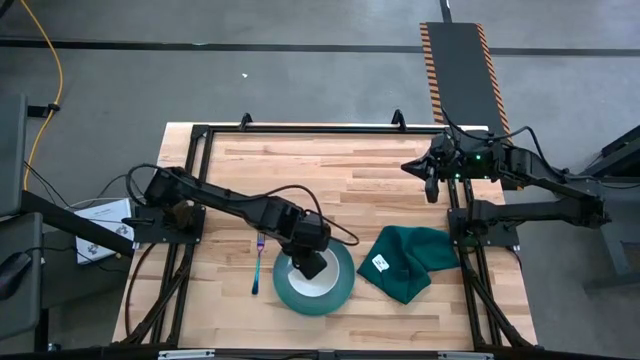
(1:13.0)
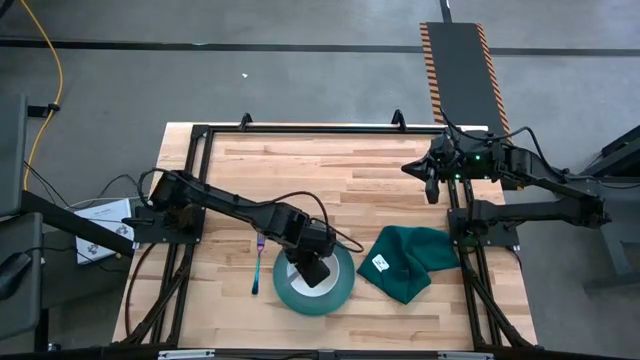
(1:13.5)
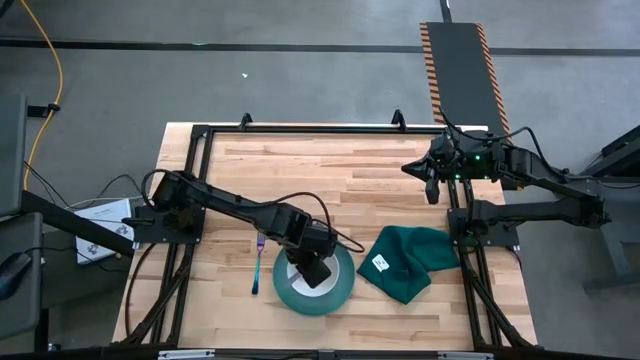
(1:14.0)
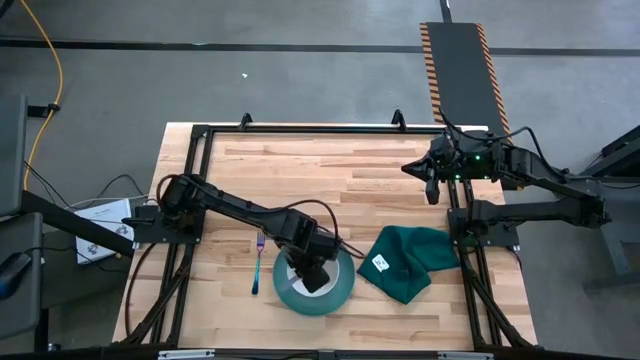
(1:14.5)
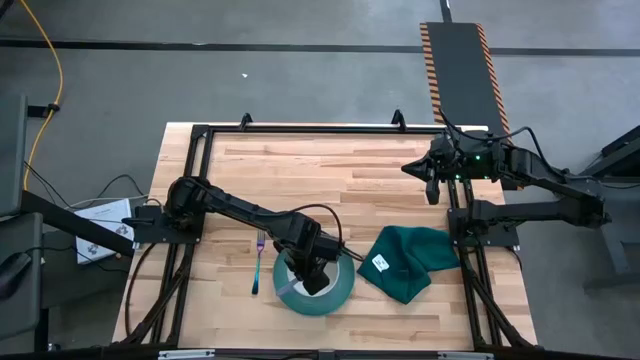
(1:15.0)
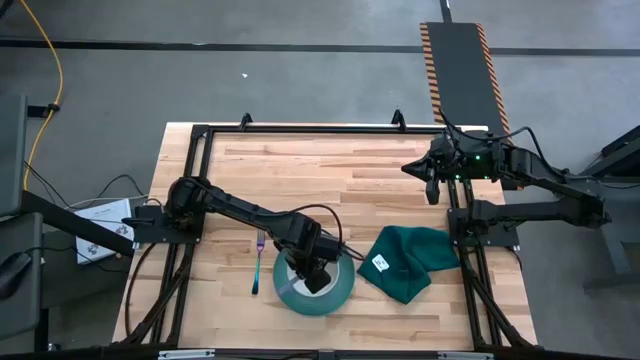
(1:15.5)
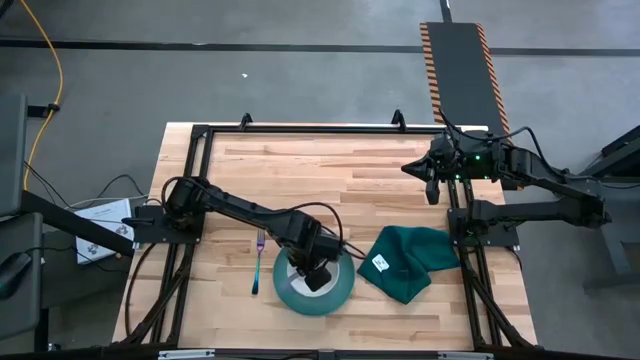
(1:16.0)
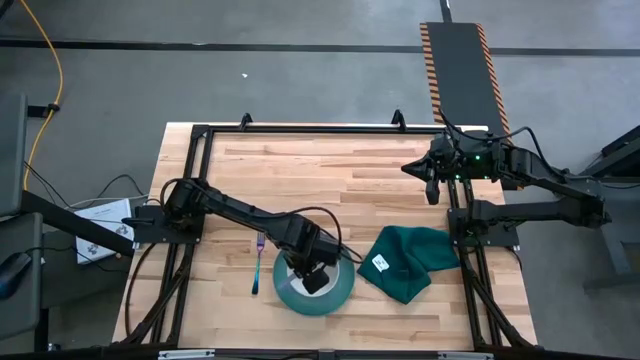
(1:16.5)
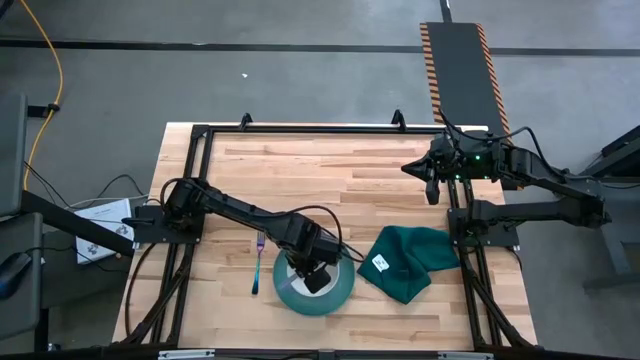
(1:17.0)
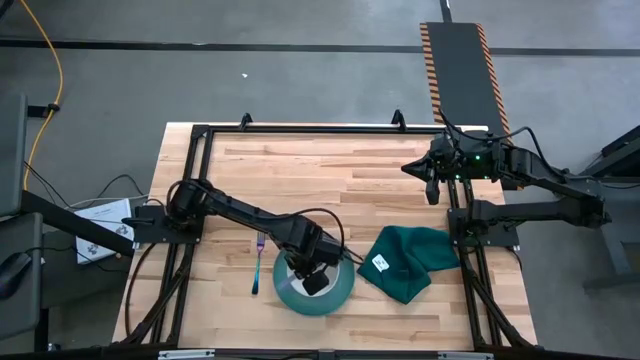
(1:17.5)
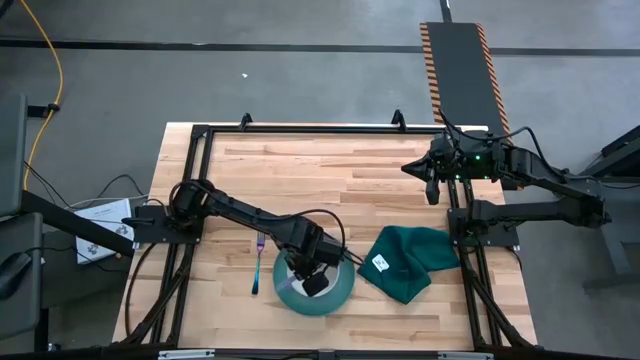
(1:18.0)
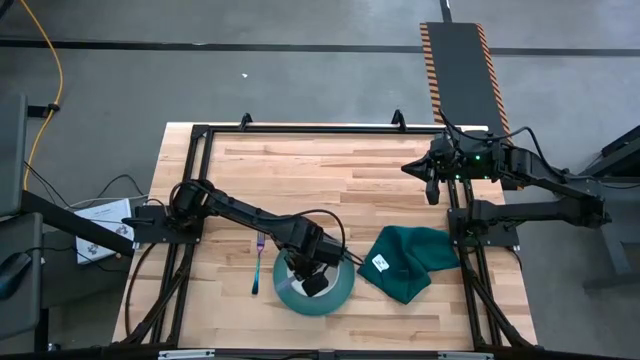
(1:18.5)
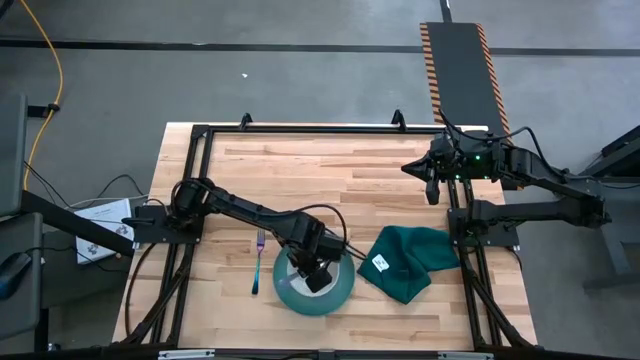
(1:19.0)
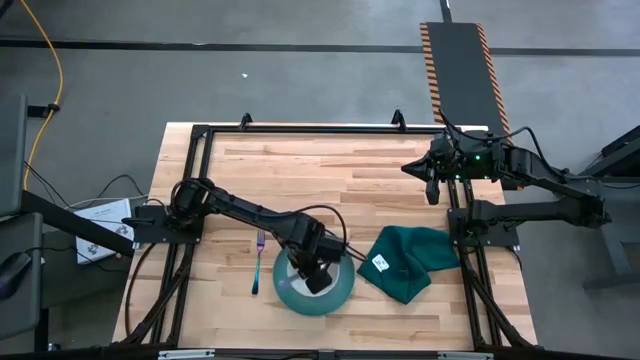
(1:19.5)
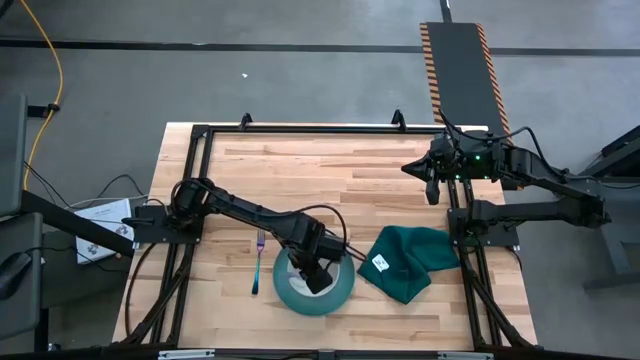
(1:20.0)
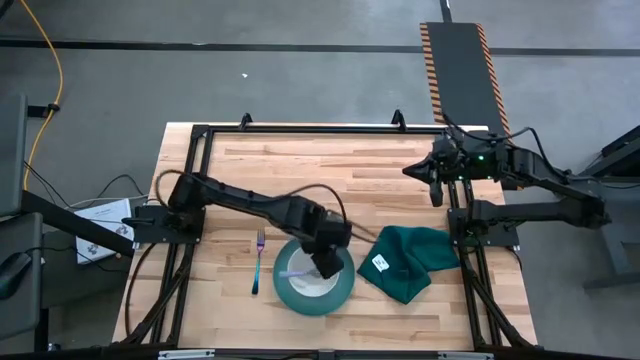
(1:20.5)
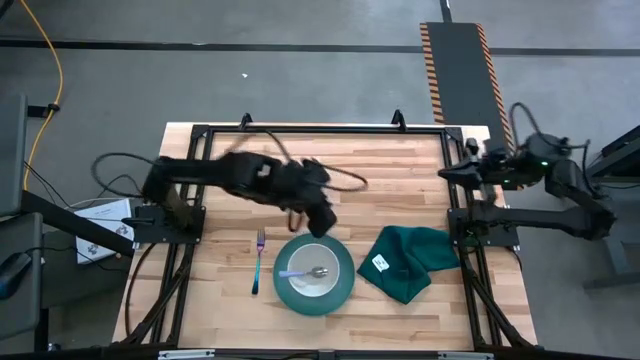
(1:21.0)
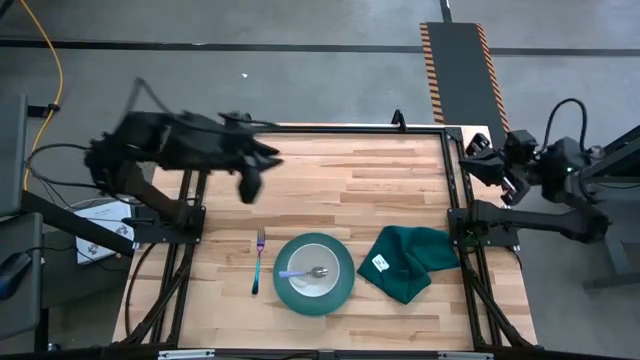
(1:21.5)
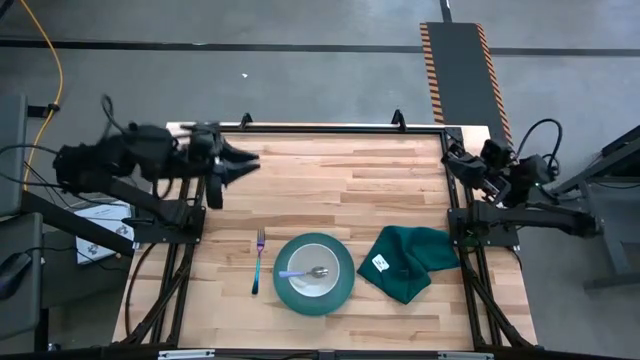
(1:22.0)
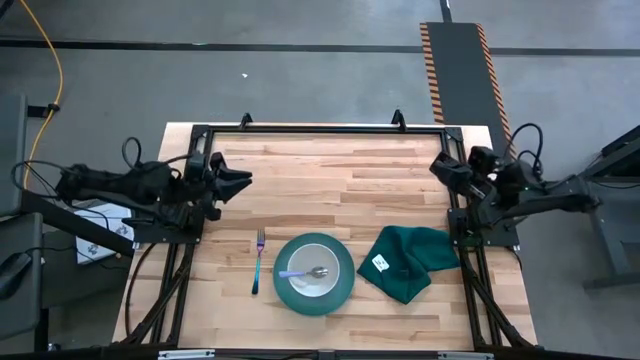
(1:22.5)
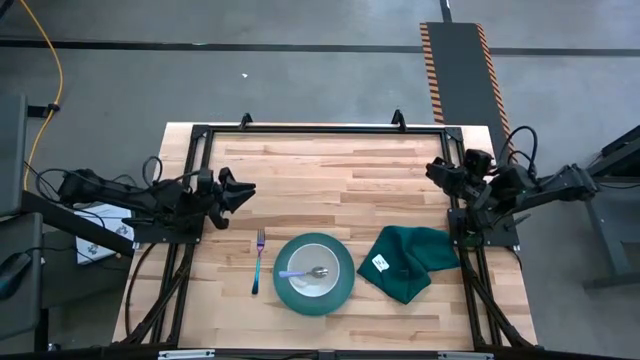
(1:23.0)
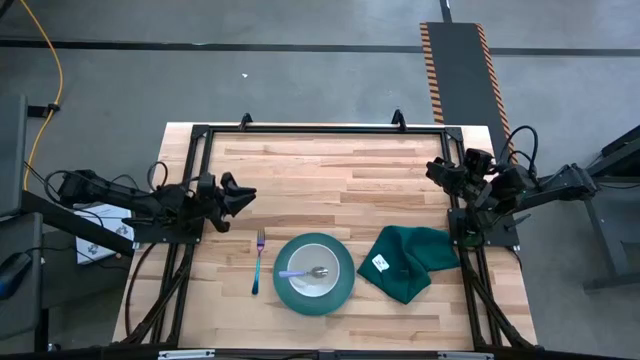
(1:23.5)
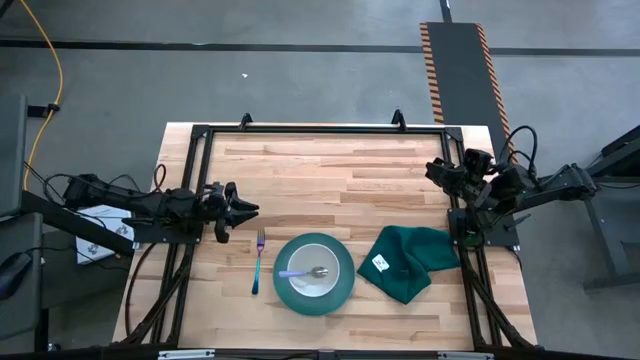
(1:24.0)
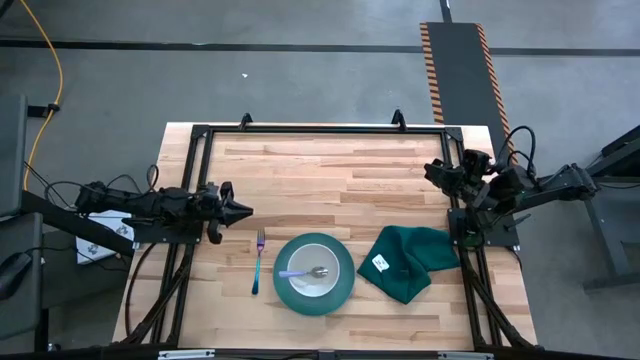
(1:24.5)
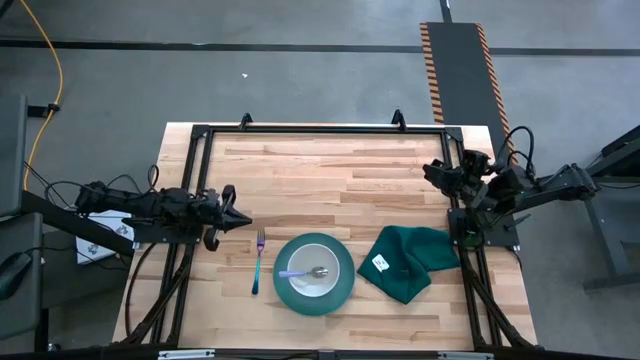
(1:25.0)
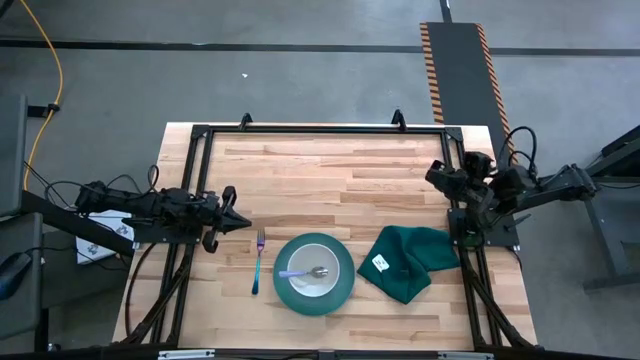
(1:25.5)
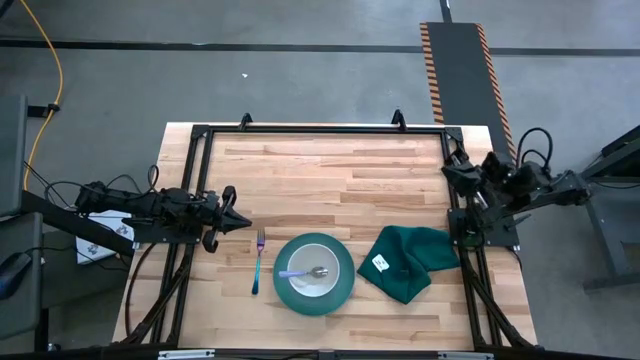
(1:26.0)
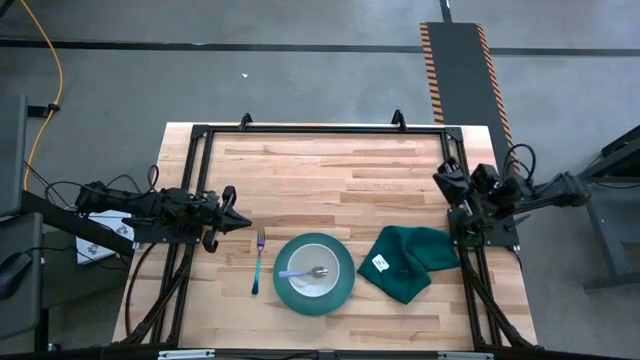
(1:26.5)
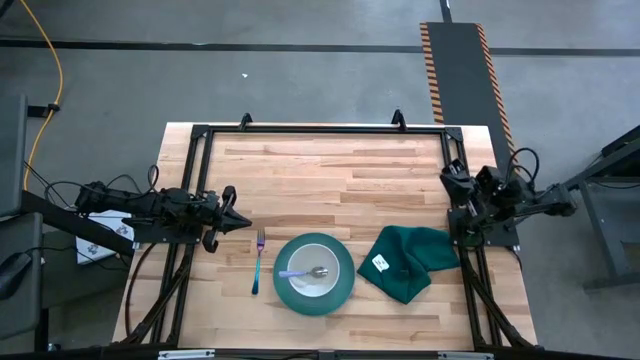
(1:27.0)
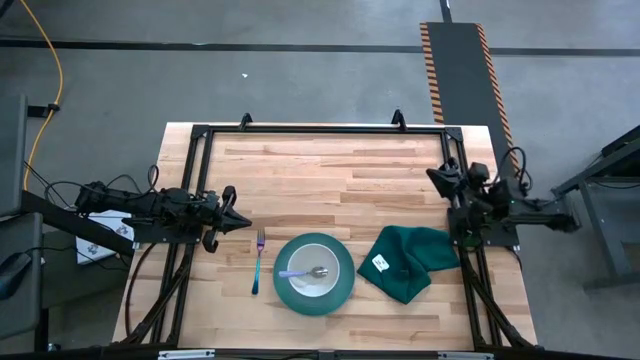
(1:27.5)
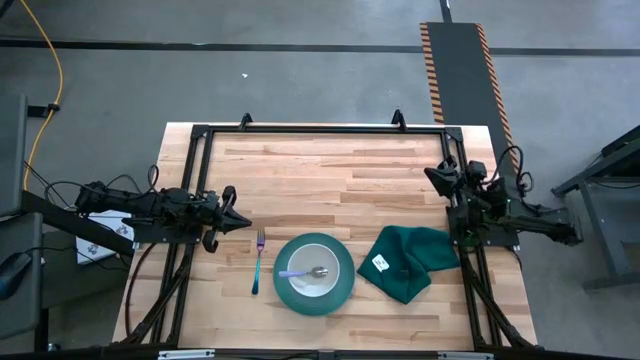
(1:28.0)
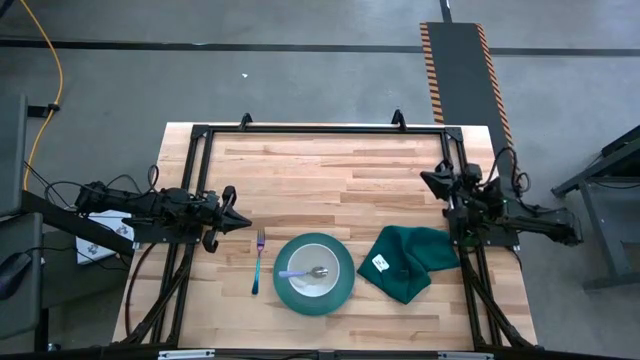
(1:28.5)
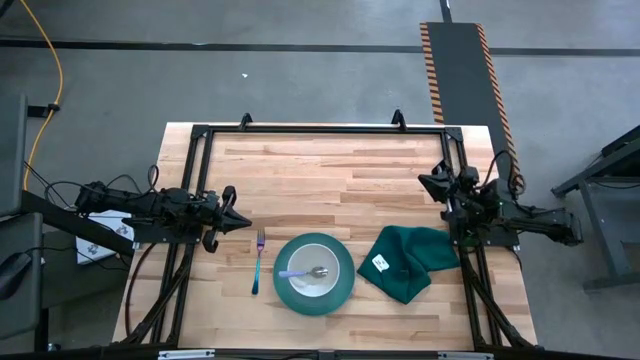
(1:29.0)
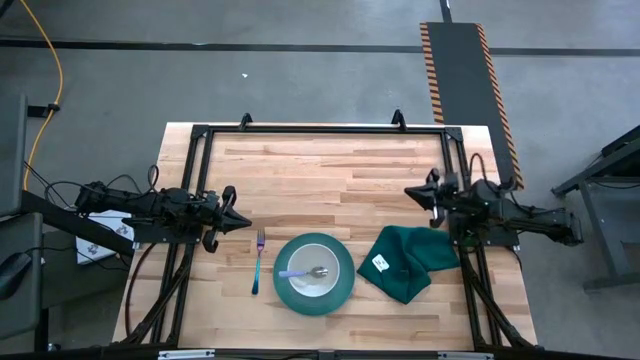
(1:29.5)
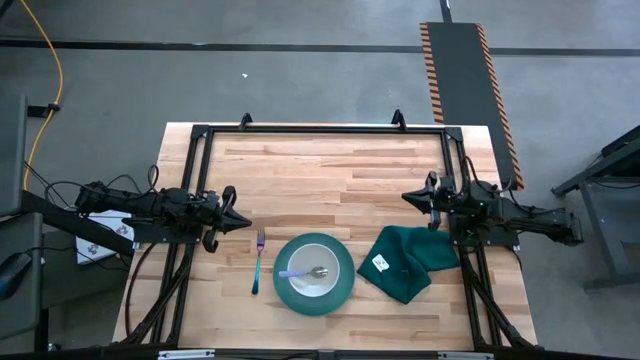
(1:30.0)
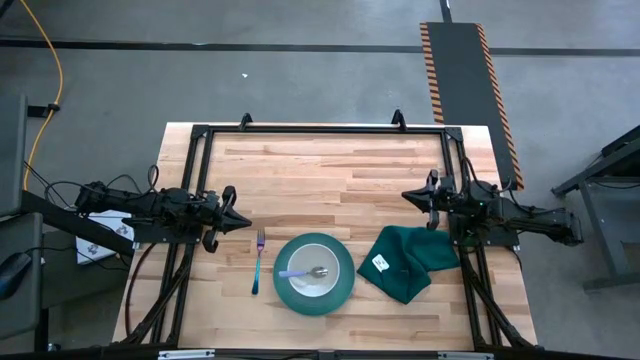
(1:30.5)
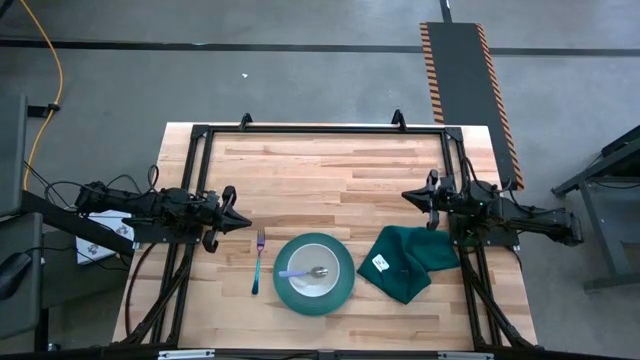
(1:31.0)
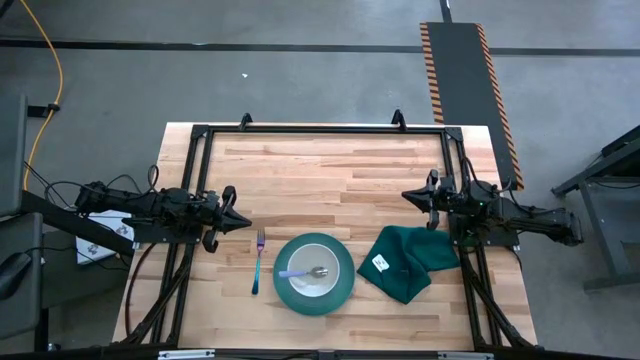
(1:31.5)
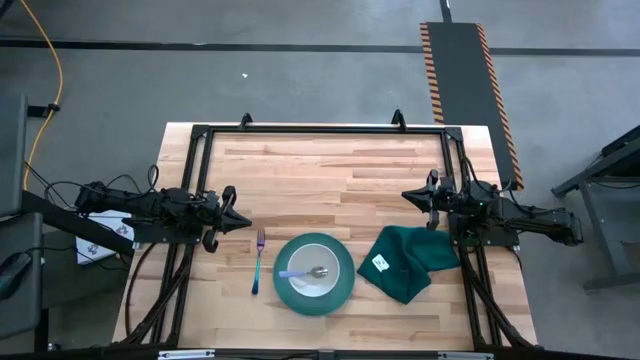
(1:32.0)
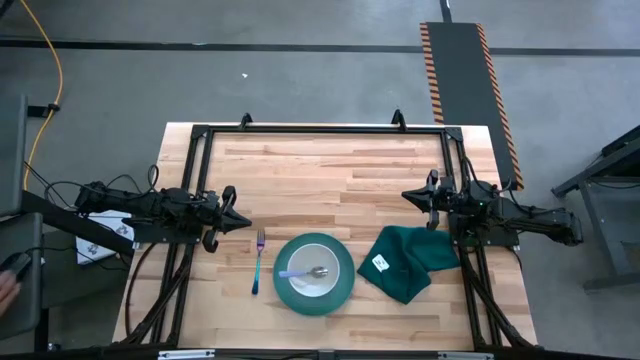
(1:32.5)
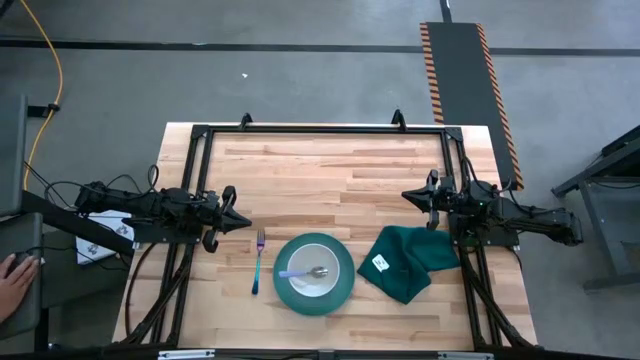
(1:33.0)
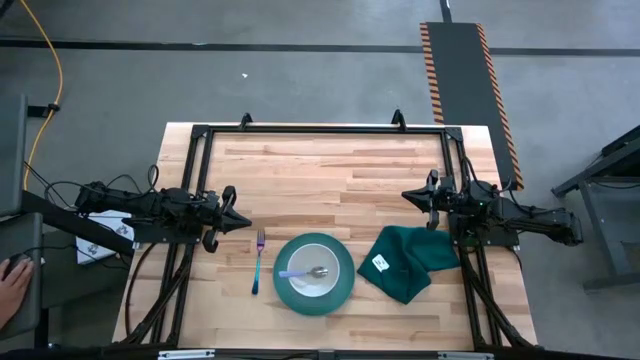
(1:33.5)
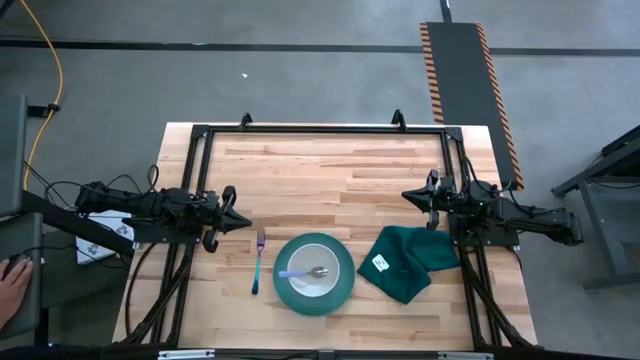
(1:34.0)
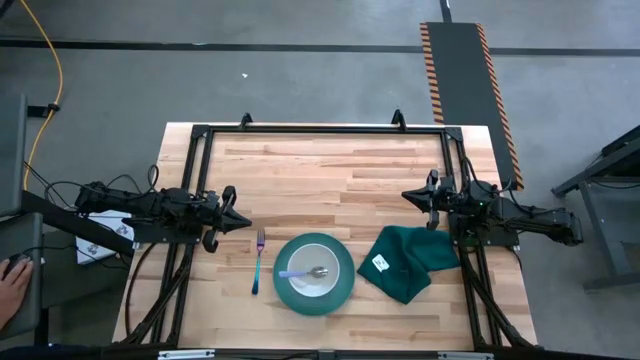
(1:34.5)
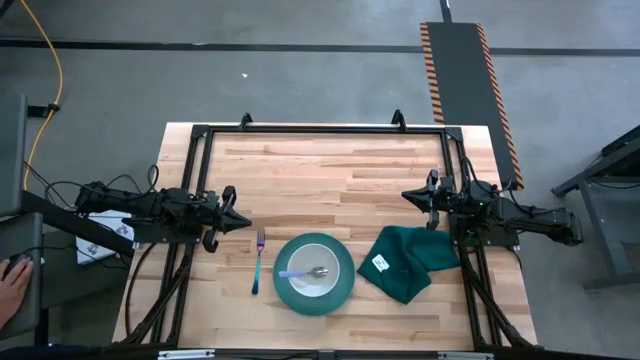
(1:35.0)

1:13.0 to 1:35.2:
Task: Set table place
Return to Home Position
